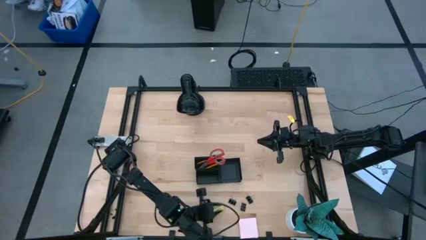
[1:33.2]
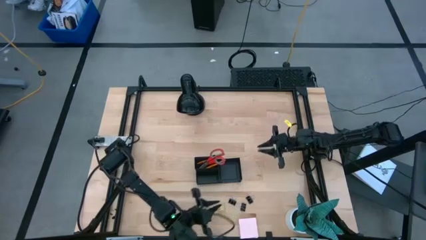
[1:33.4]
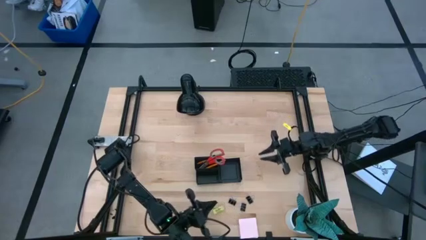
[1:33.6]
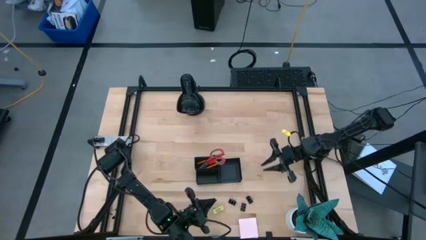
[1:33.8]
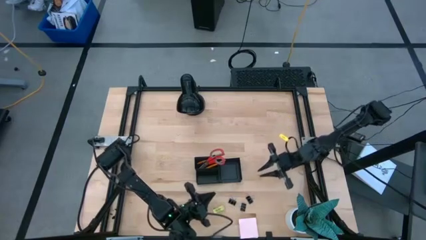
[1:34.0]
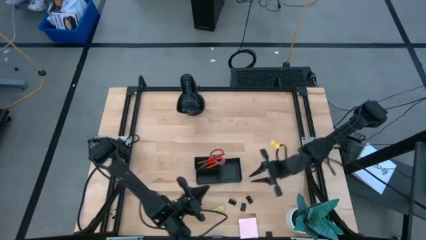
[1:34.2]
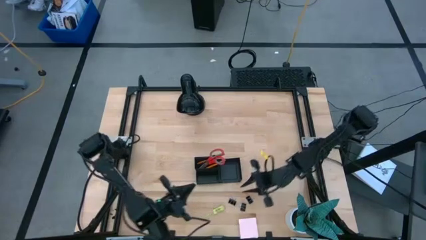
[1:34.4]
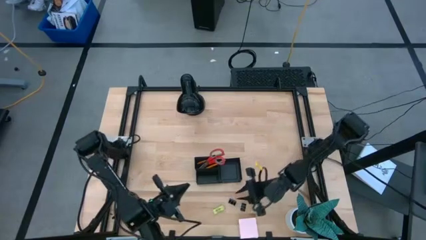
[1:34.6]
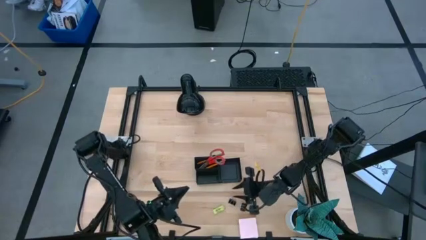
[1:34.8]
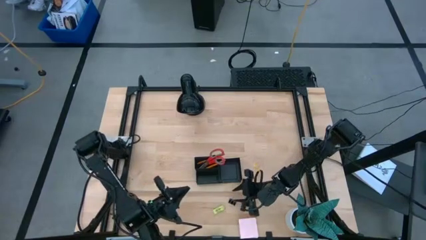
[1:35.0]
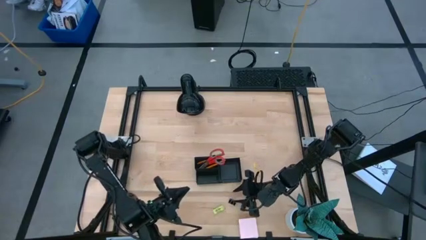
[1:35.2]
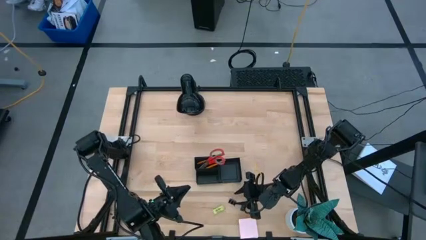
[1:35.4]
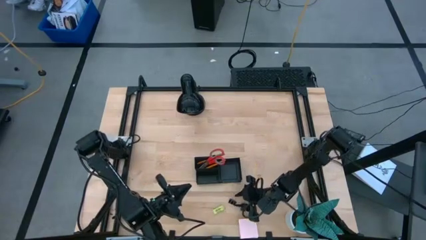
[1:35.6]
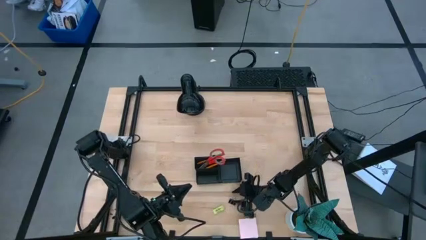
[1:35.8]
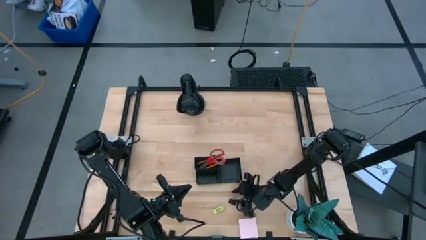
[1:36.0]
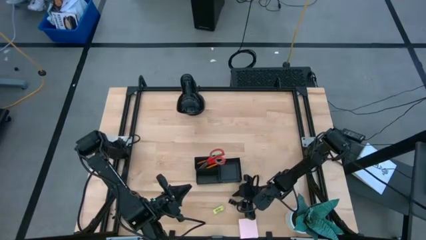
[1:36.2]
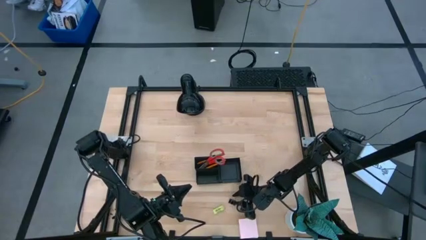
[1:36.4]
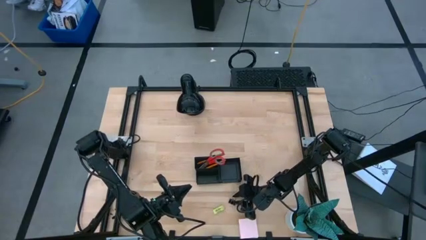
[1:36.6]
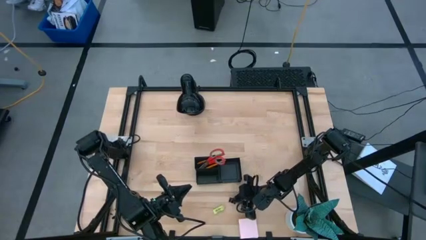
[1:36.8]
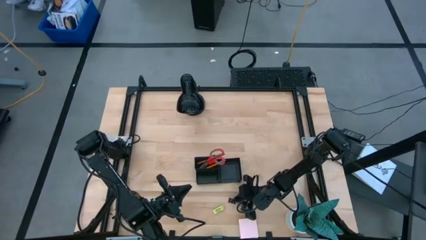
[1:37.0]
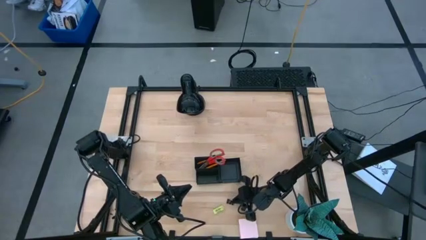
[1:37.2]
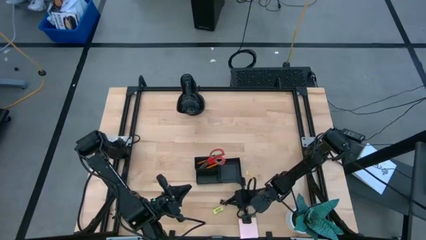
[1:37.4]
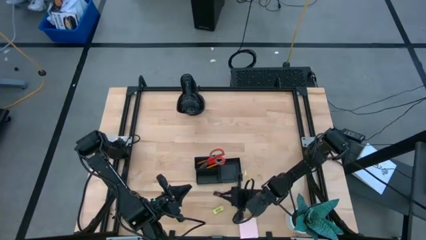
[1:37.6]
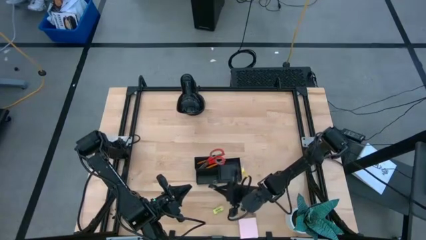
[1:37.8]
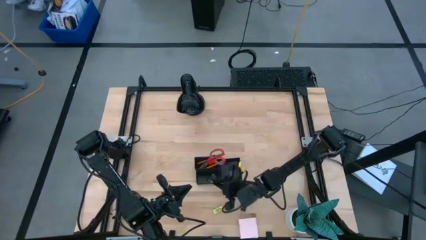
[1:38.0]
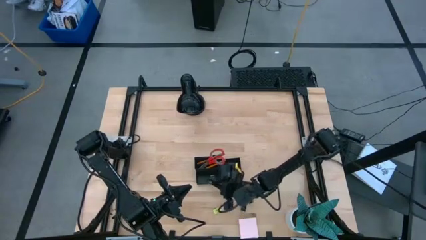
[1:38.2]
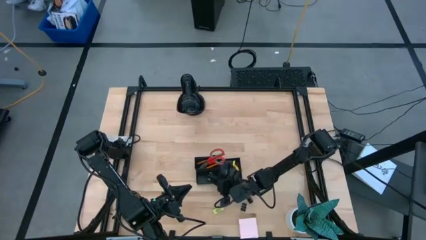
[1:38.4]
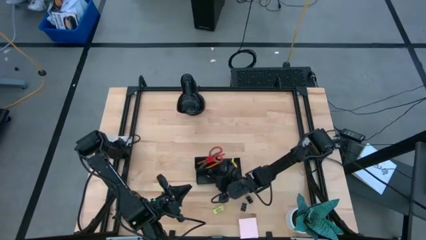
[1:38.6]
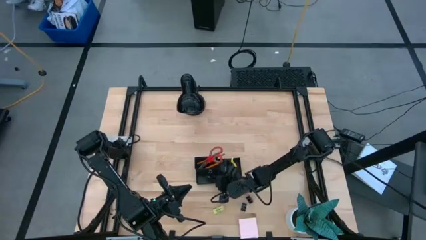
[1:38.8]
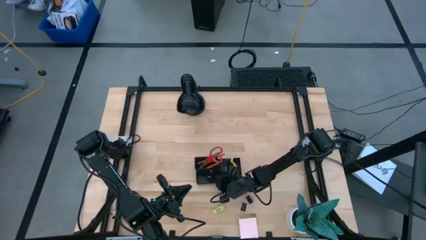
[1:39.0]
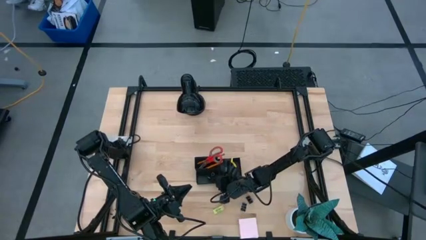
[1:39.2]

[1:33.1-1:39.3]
Task: Pick and place office supplies into organizer
Put the left black binder clip into the desk organizer

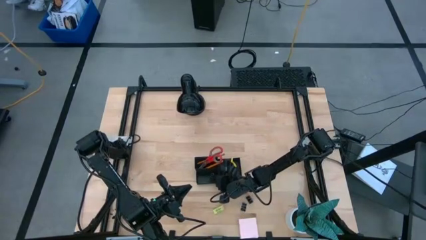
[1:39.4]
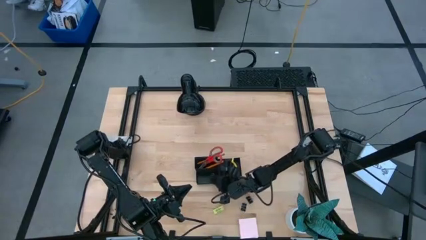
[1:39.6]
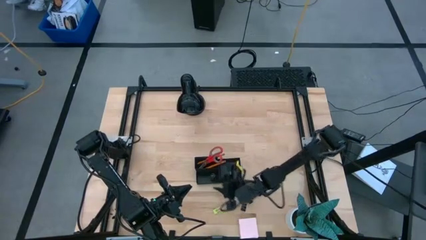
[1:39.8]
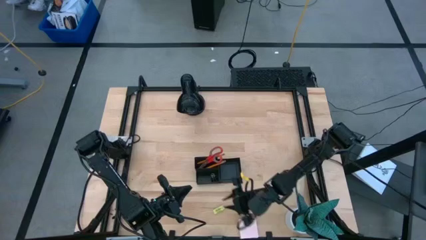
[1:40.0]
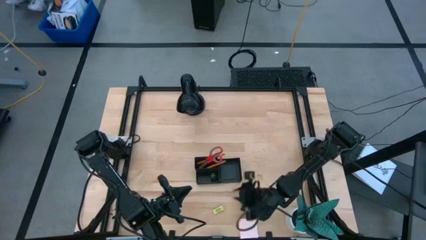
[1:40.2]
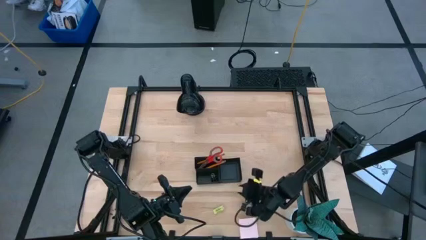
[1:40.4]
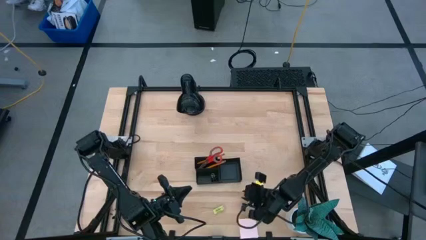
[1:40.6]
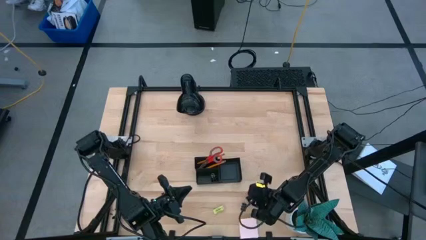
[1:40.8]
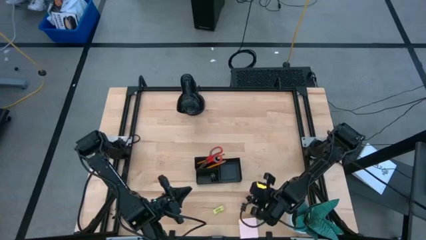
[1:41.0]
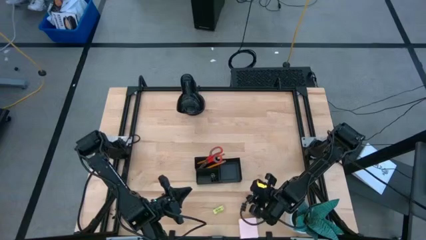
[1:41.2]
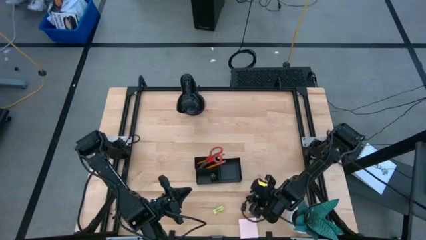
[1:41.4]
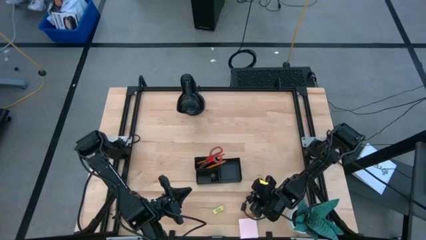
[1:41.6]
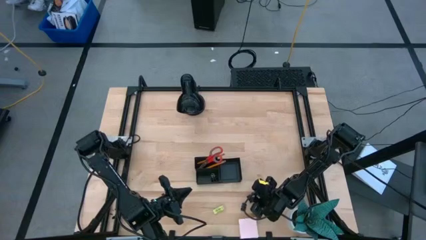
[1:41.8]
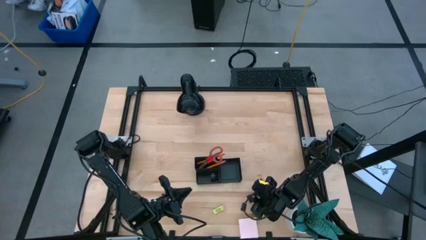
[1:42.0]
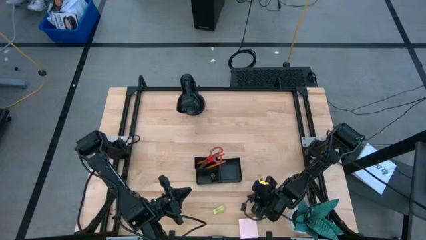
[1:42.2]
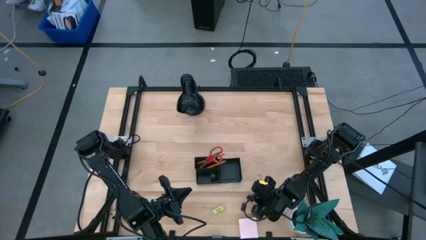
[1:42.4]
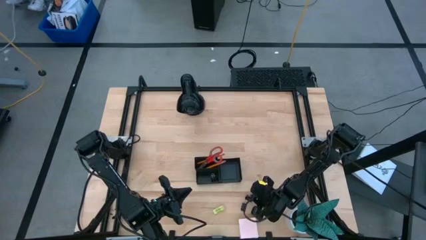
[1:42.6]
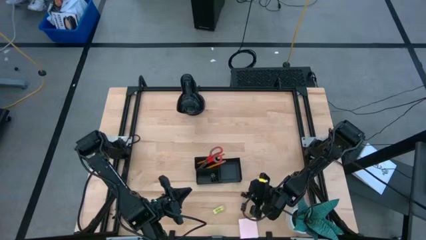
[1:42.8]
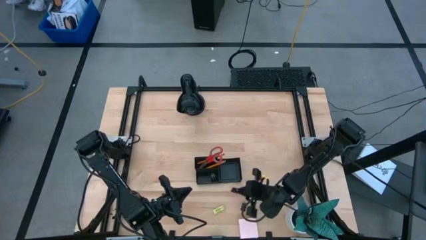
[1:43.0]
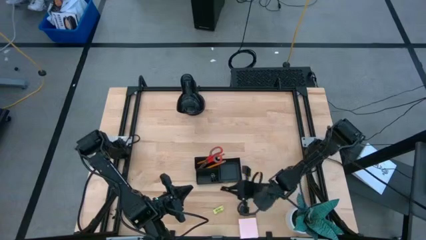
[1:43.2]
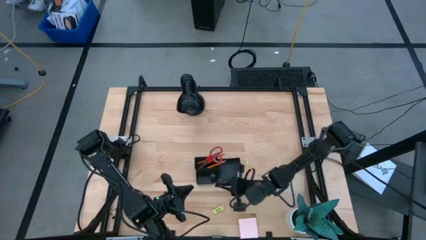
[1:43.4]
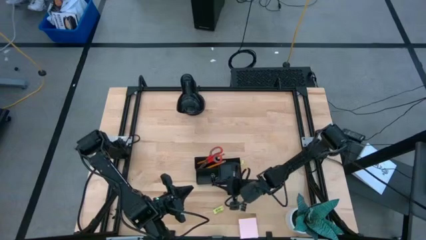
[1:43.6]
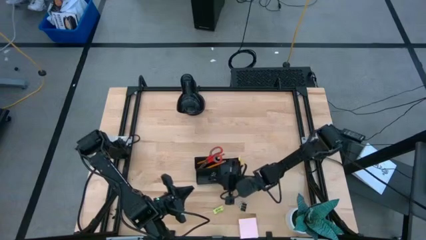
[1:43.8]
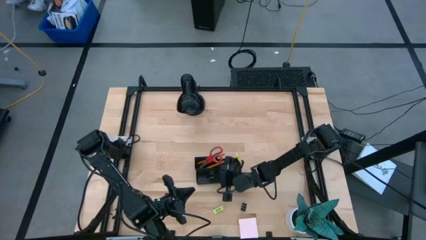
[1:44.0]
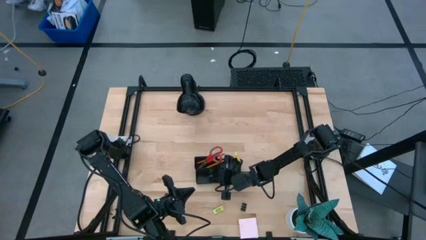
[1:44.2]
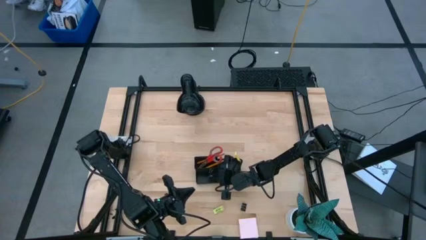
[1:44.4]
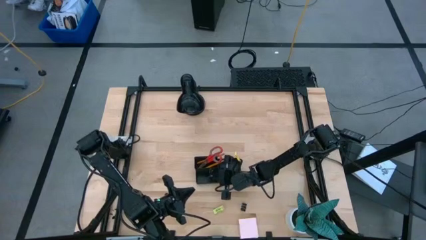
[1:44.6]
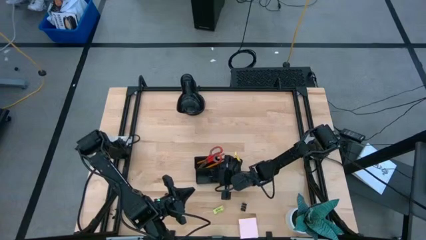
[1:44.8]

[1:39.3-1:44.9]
Put the right black binder clip into the desk organizer

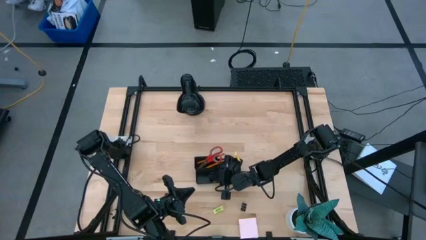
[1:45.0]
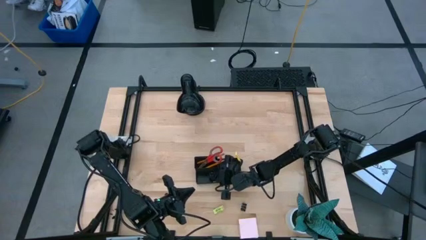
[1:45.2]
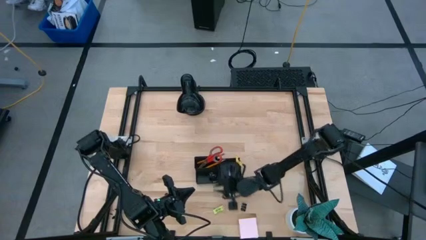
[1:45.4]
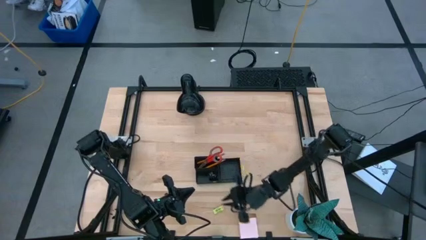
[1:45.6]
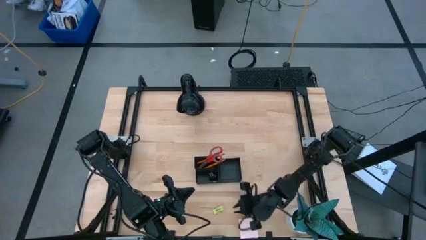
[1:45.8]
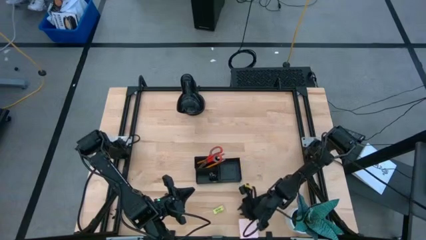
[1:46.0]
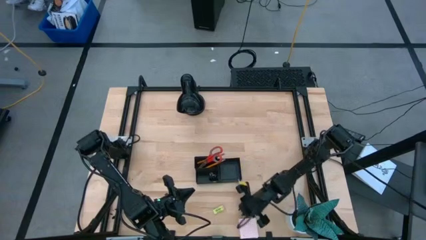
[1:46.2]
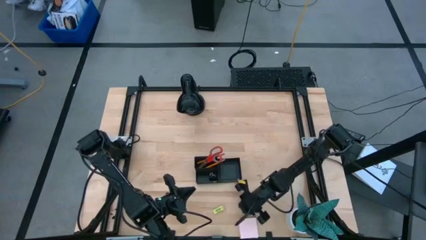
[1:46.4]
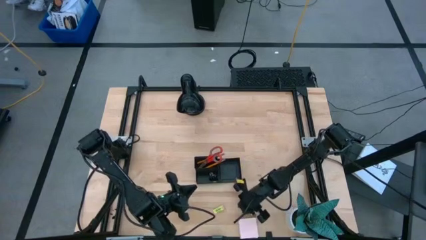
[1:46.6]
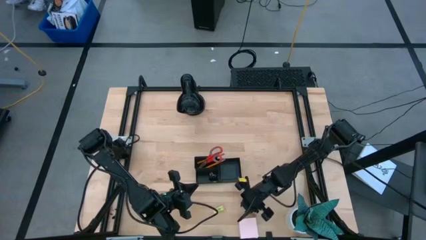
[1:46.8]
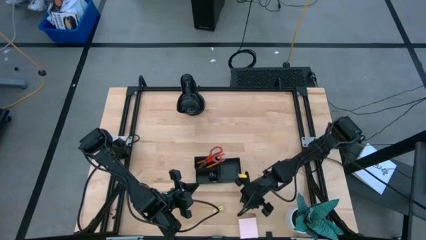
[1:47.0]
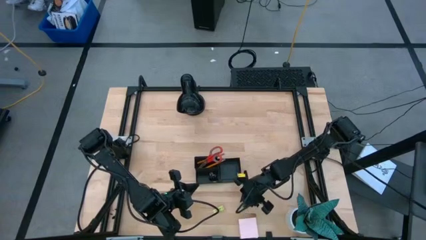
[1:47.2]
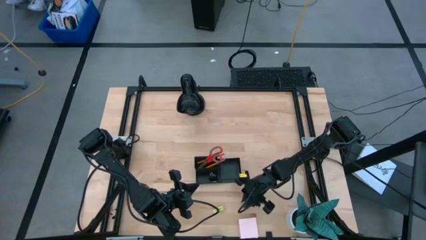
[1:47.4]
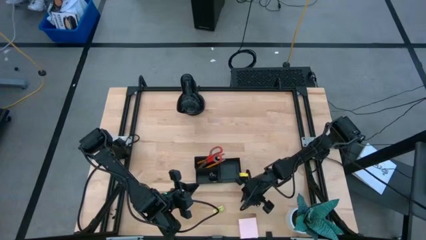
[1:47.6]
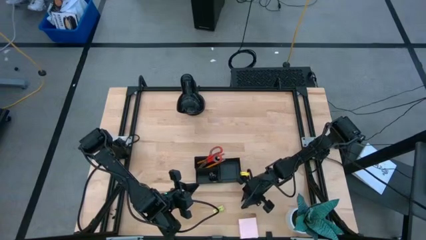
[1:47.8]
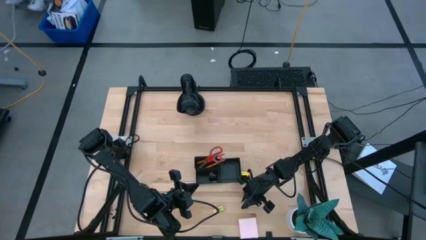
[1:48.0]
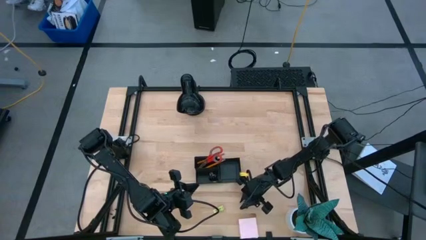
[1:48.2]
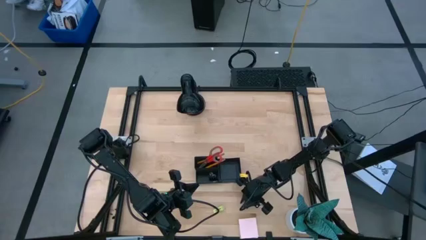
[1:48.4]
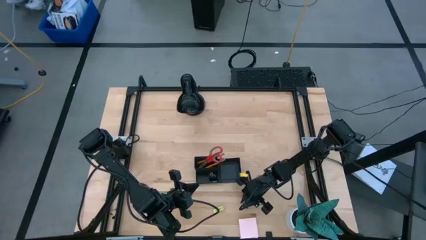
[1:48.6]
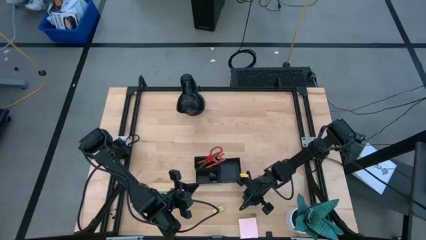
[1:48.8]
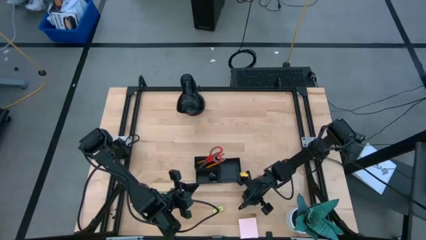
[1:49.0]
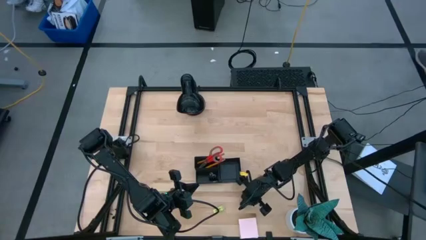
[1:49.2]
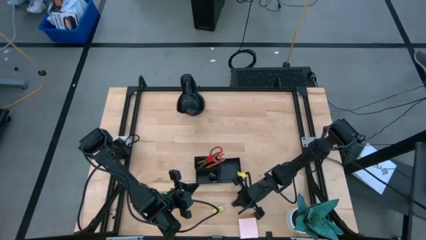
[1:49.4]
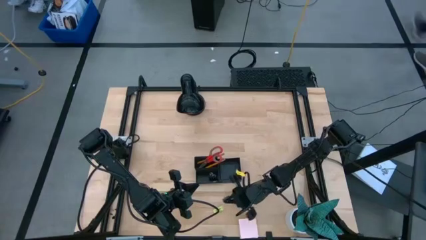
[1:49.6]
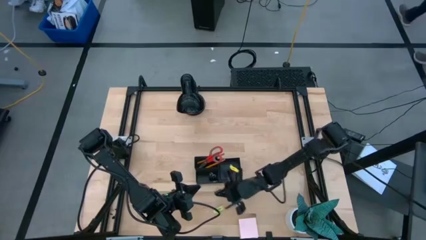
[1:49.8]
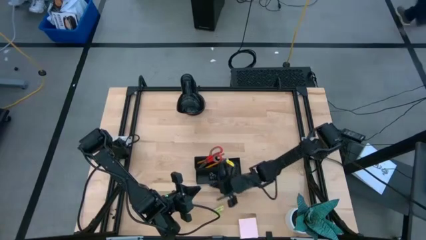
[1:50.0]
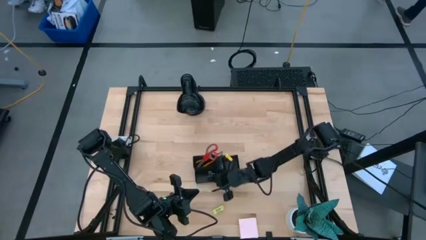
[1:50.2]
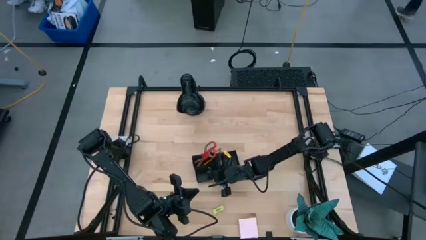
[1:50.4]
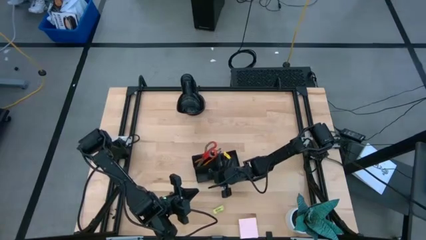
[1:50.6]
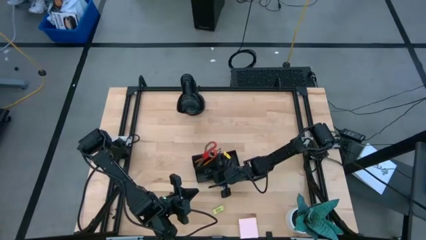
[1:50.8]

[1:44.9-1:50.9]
Put the black binder clip into the desk organizer
